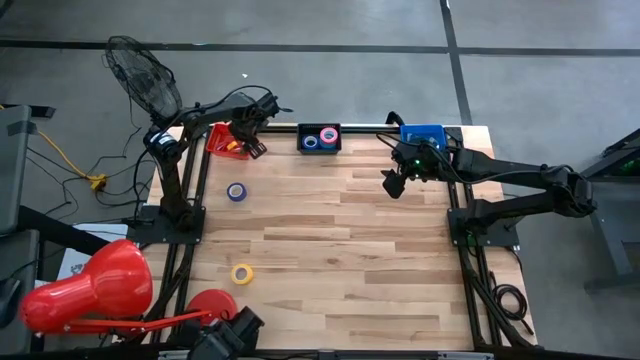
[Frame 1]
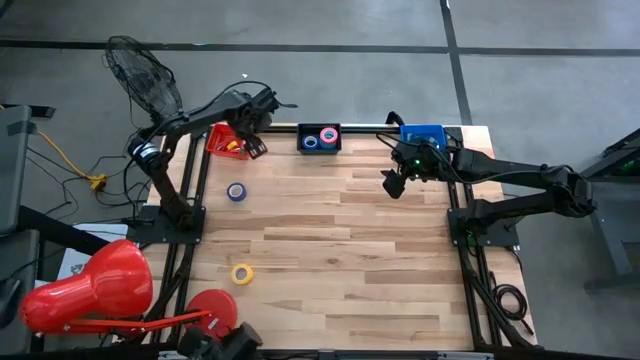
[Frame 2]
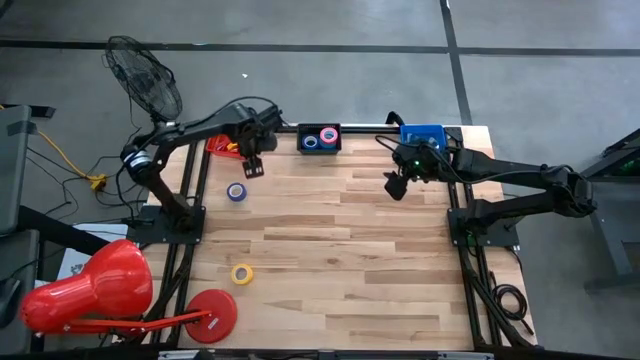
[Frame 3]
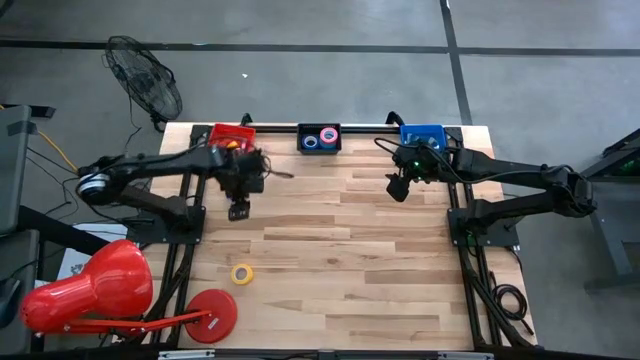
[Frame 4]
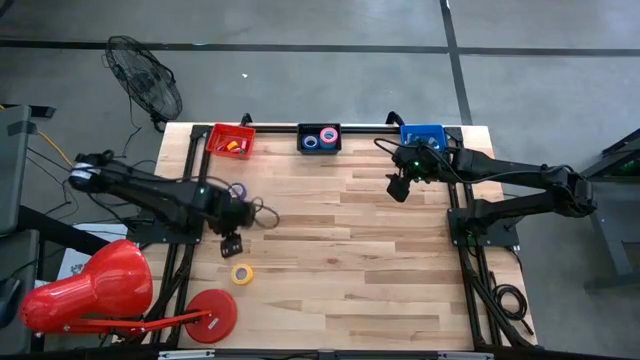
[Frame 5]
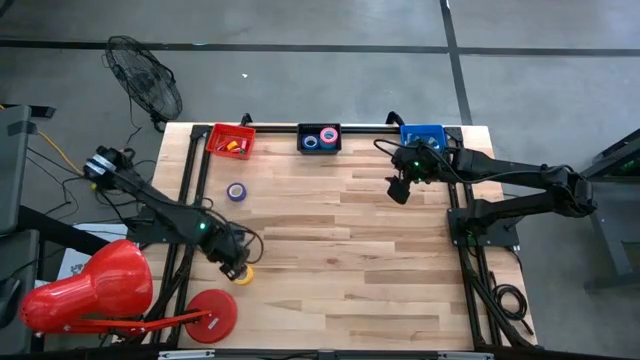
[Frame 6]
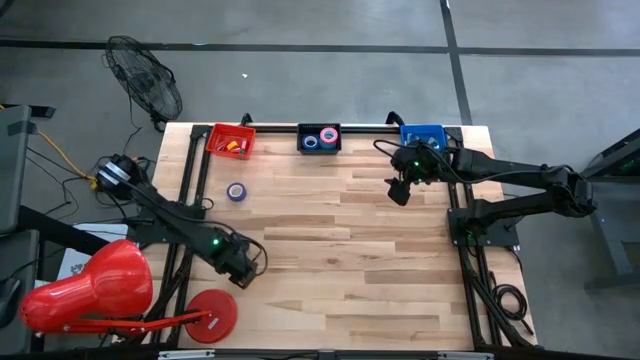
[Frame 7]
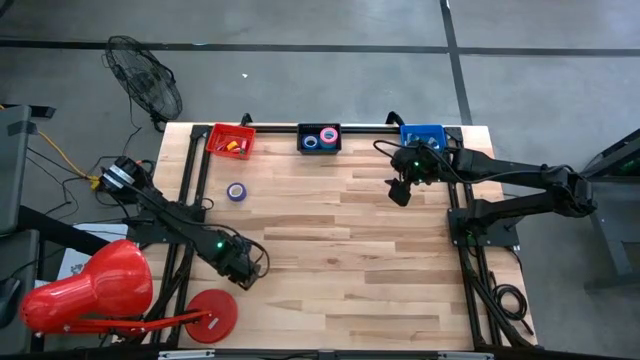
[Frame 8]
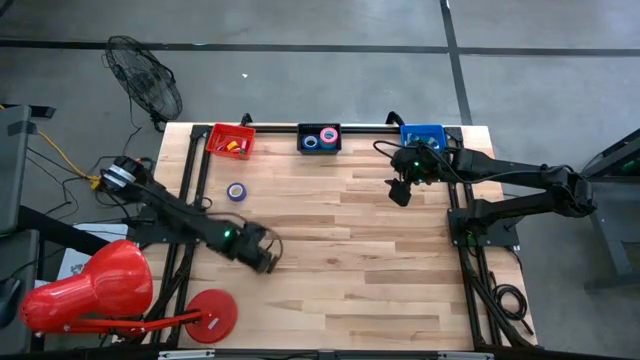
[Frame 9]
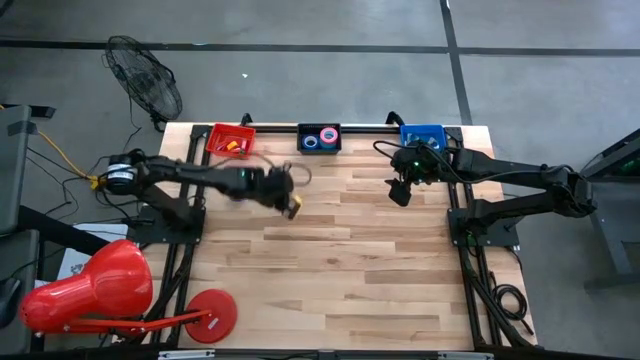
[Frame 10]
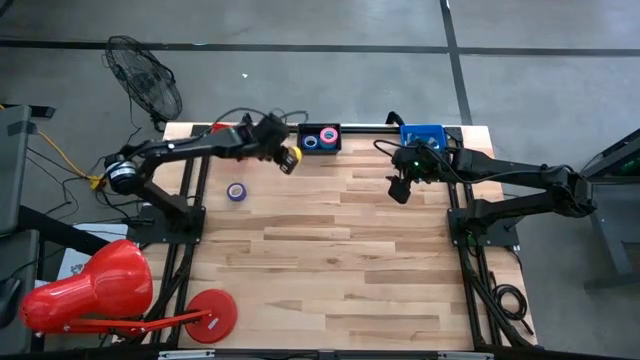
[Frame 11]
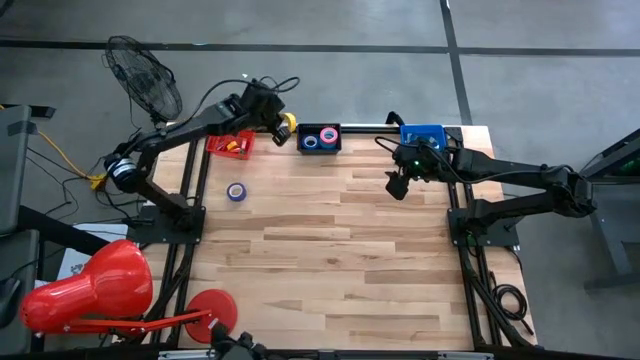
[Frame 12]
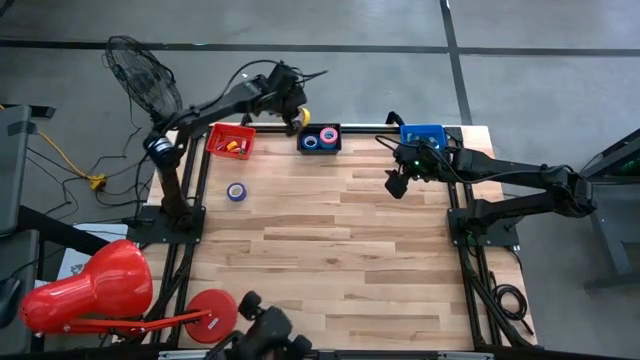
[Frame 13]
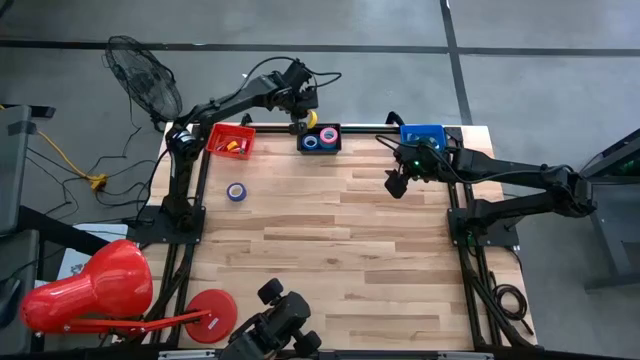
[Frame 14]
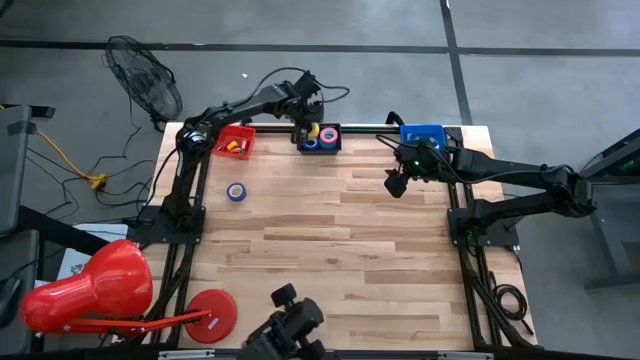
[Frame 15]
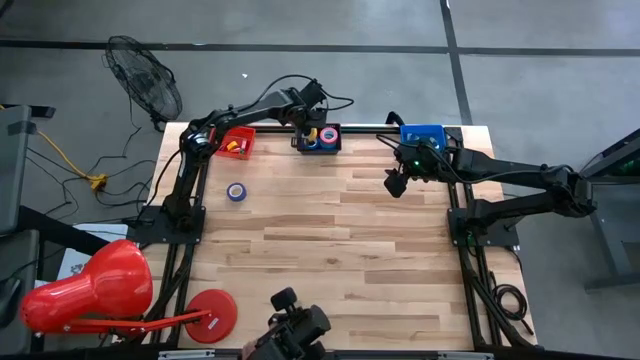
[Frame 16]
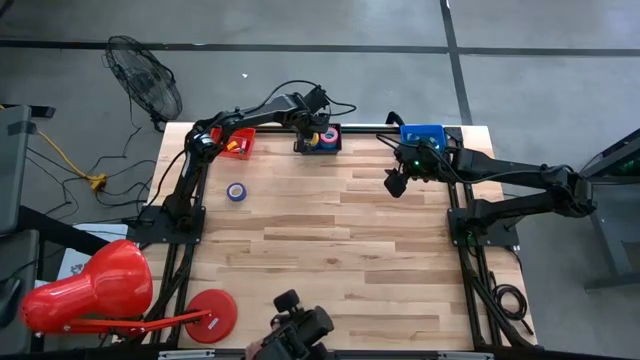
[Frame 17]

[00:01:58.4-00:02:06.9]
Task: Pick and place Stapler, Stapler remover, tape
Put the yellow tape into the black bin

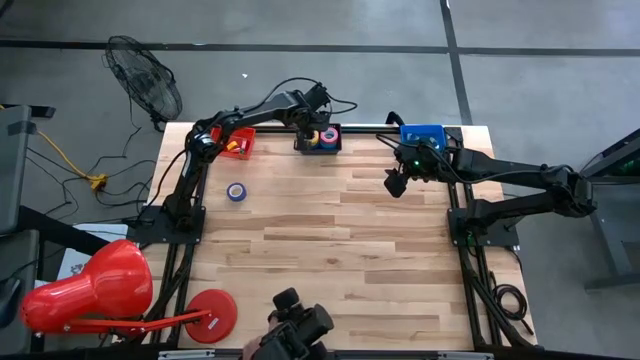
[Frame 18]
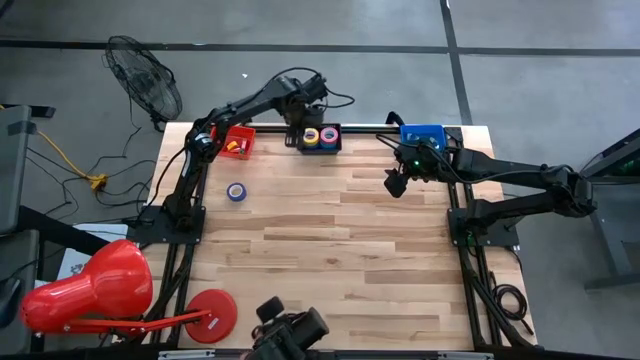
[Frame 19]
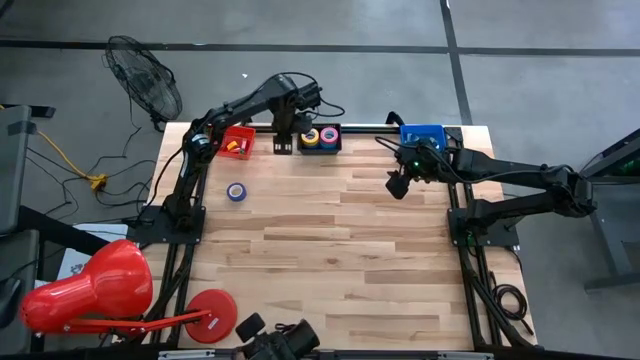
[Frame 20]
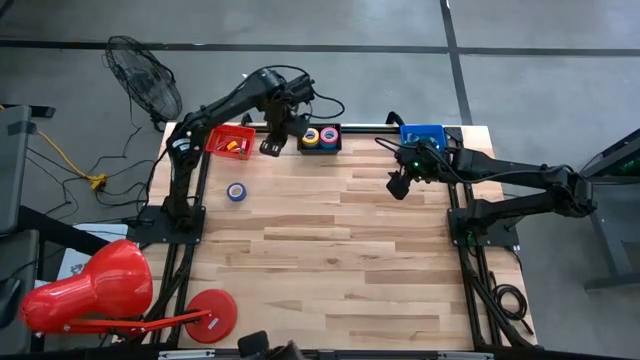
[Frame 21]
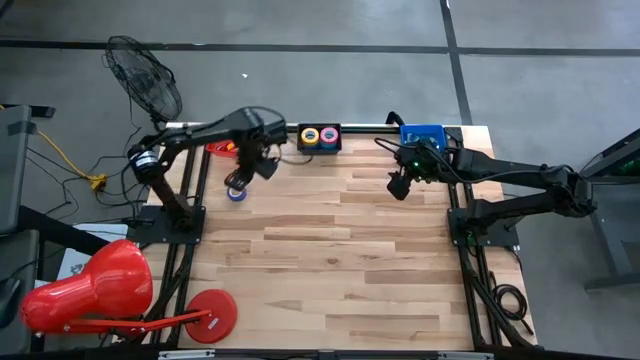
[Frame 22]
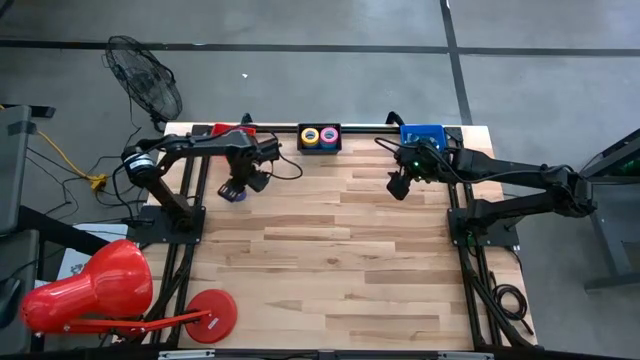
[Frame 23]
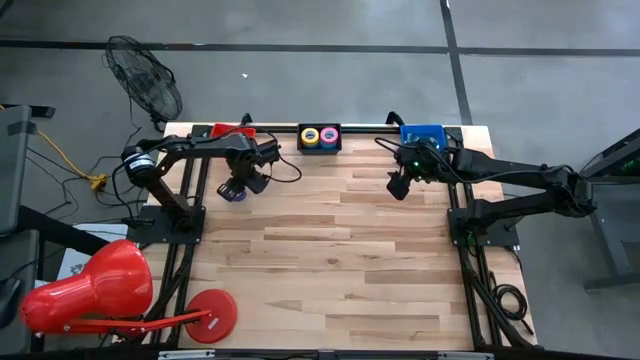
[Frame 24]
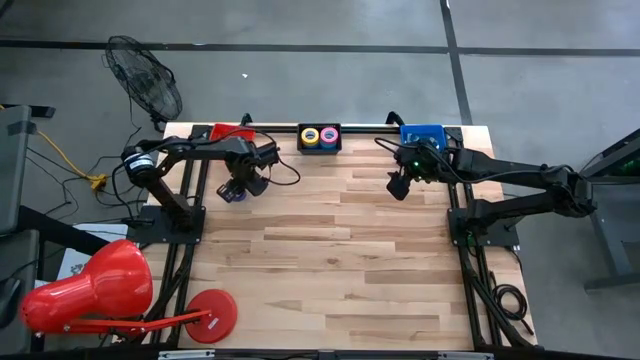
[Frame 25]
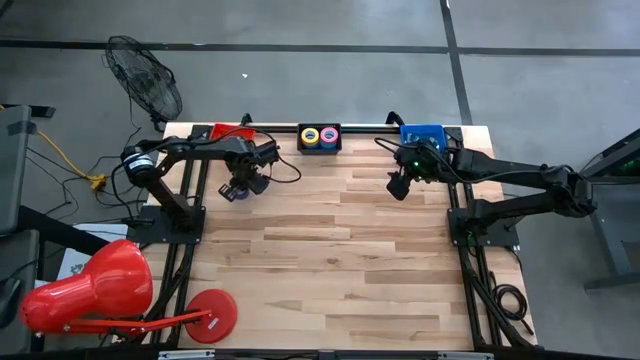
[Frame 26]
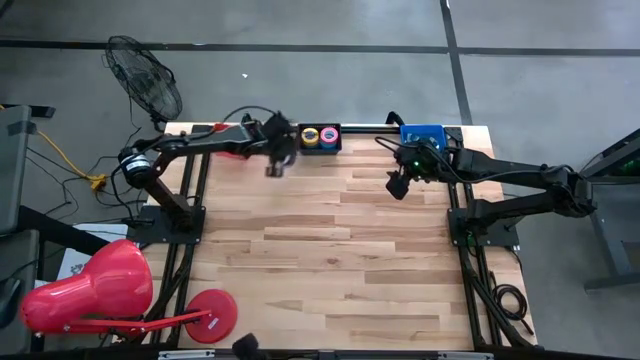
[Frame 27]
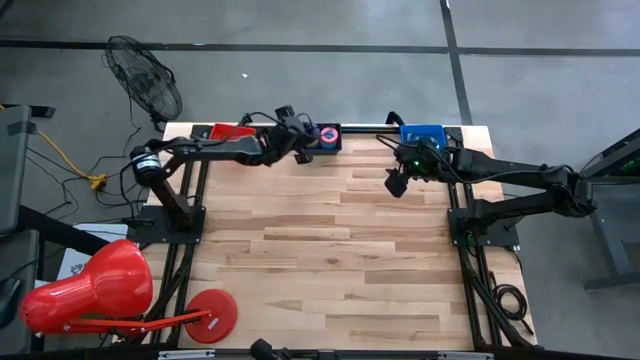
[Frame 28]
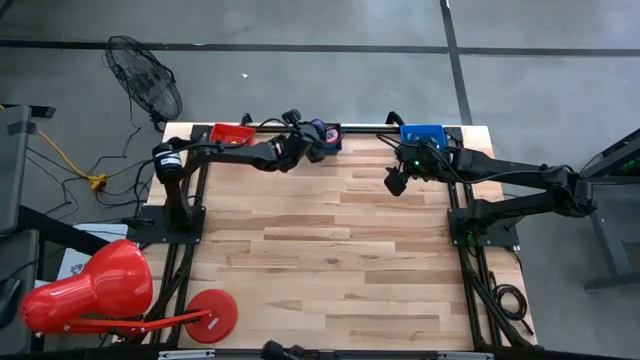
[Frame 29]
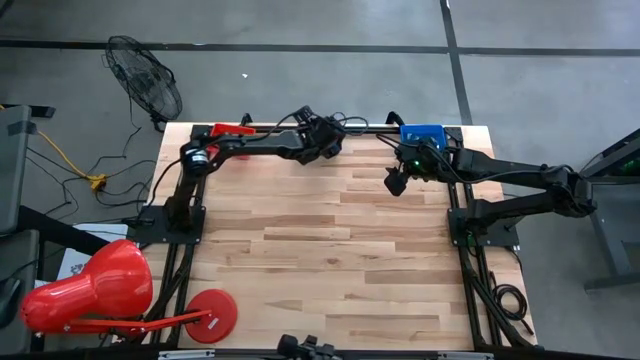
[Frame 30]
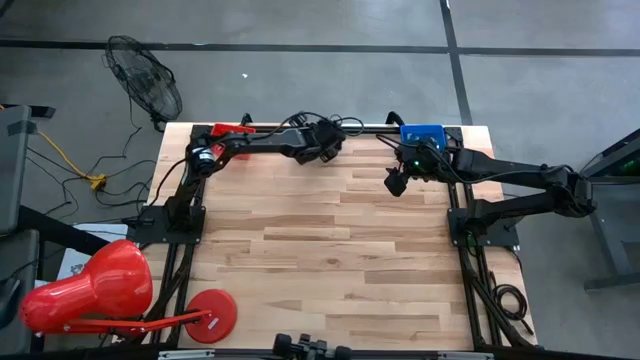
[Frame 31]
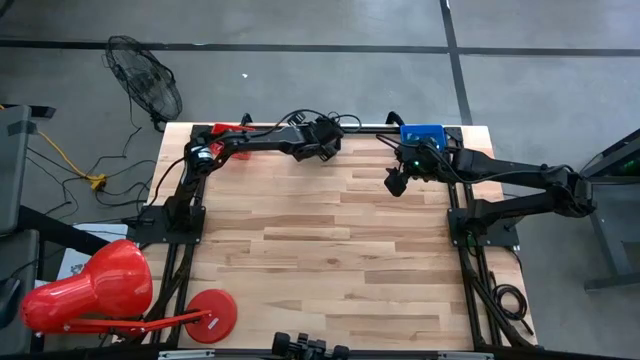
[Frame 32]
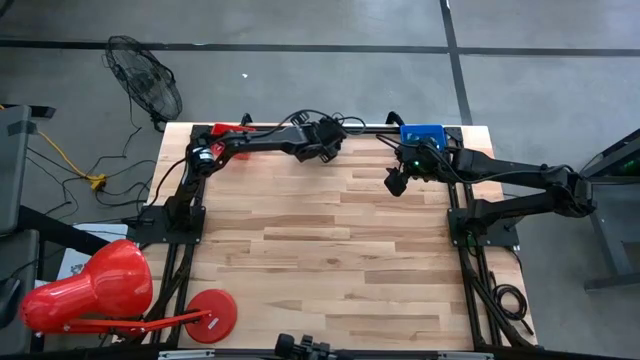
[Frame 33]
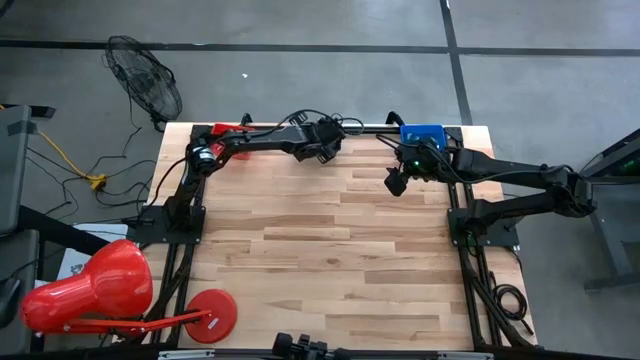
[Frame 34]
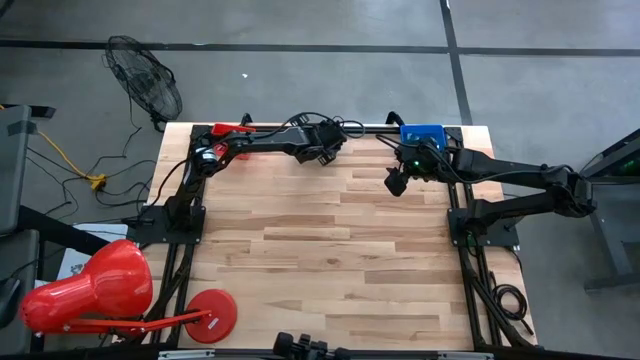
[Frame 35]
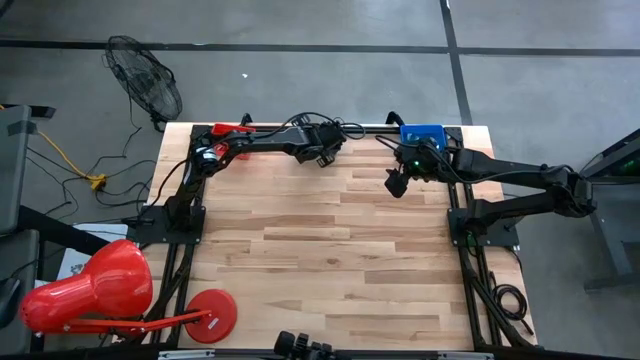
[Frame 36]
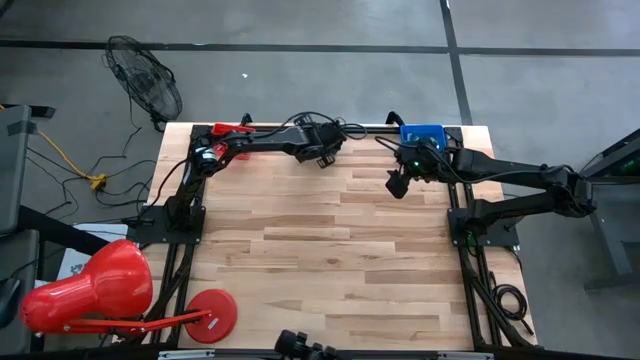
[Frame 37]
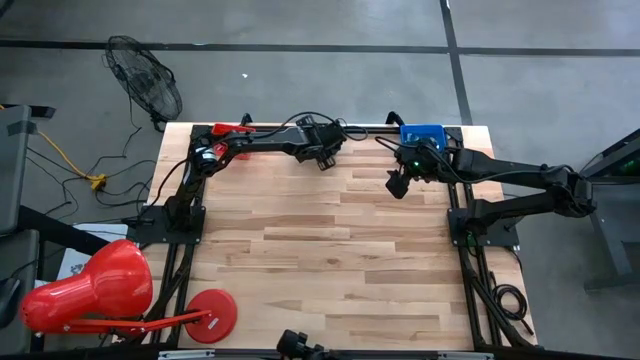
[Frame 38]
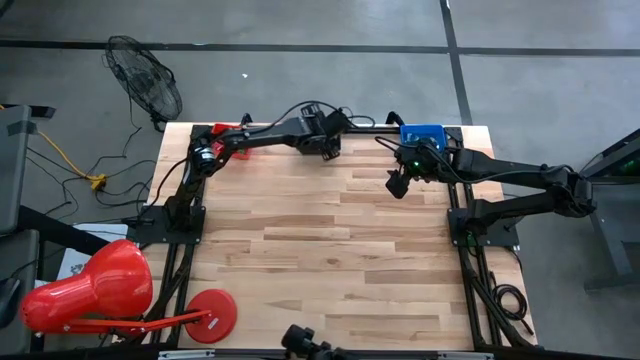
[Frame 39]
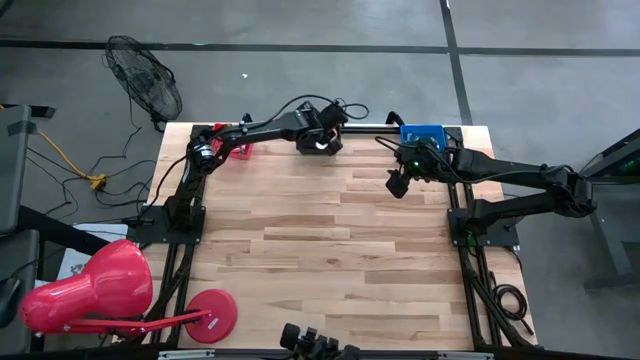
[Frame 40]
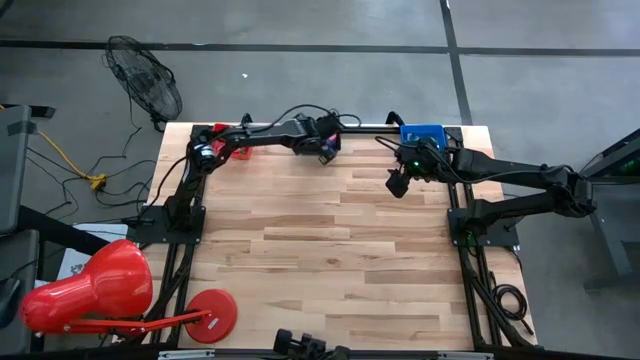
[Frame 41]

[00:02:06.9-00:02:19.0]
Put the blue tape into the black bin
